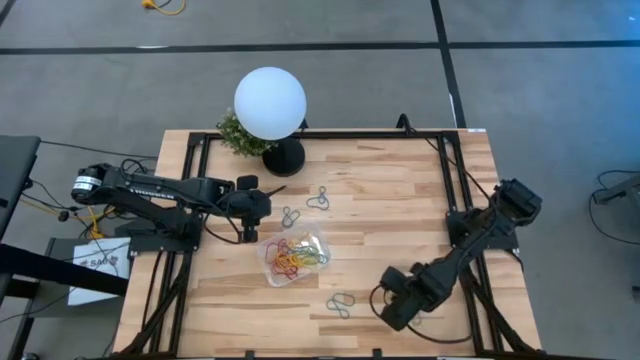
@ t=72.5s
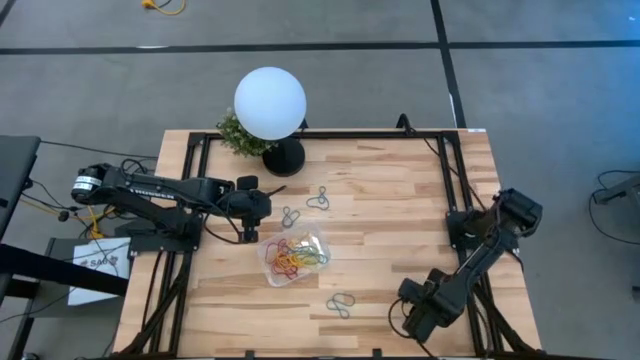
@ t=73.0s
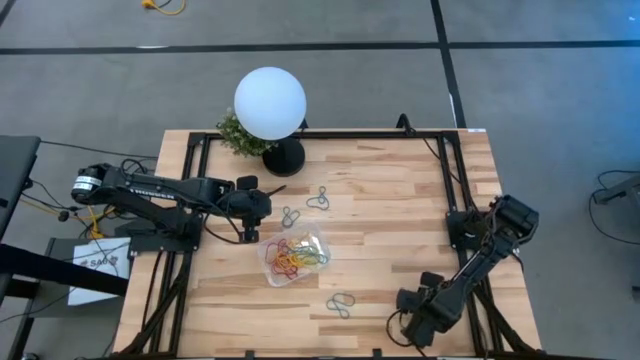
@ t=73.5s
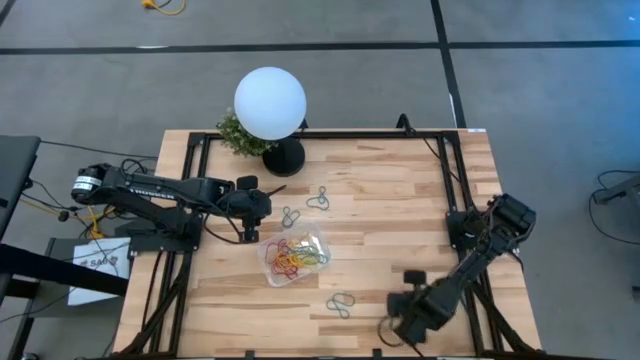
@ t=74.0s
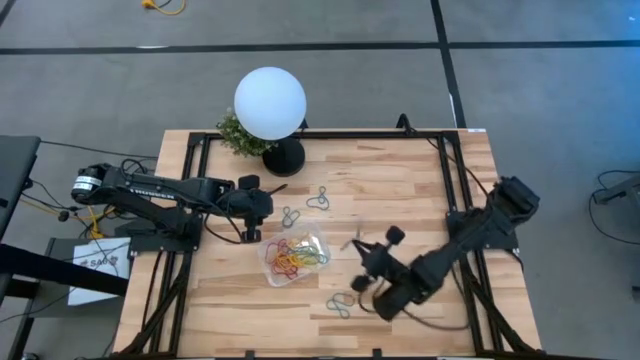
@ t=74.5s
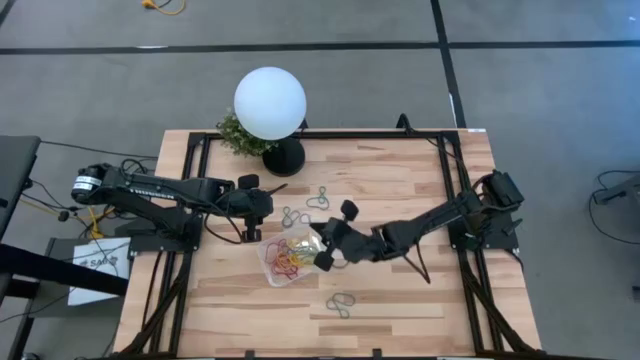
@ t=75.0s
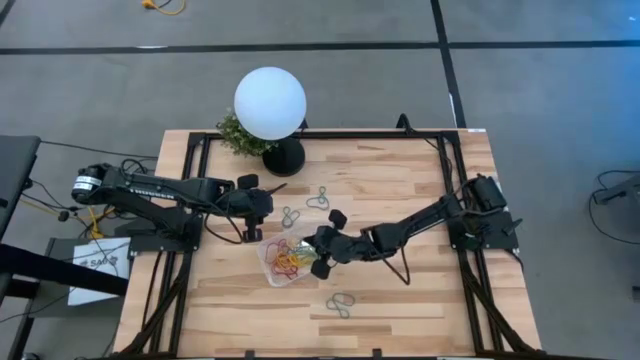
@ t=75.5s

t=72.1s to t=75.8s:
Task: Pick and place items into bin
Put the blue rubber band into the transparent bin

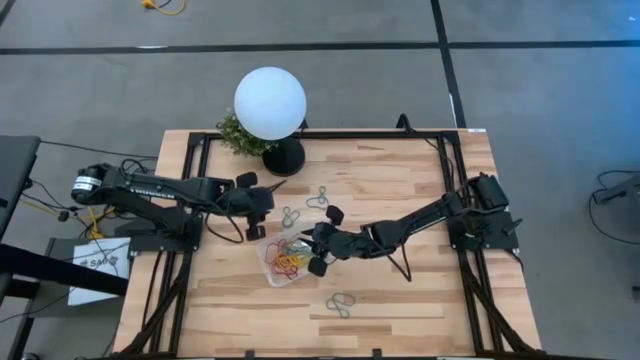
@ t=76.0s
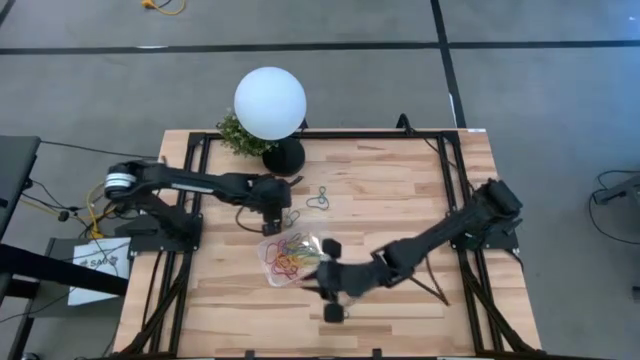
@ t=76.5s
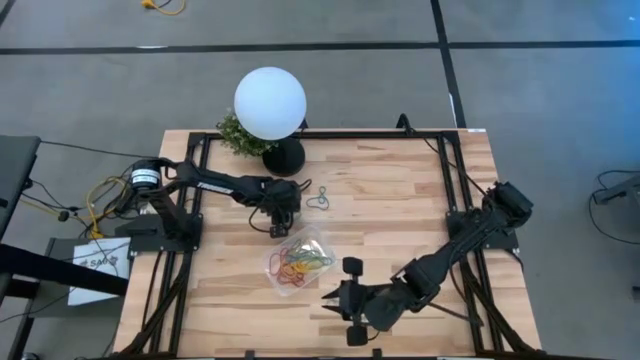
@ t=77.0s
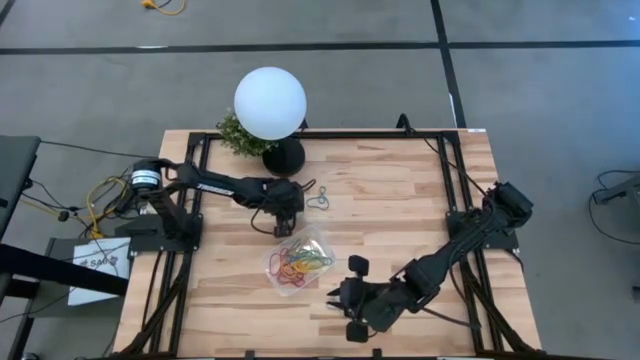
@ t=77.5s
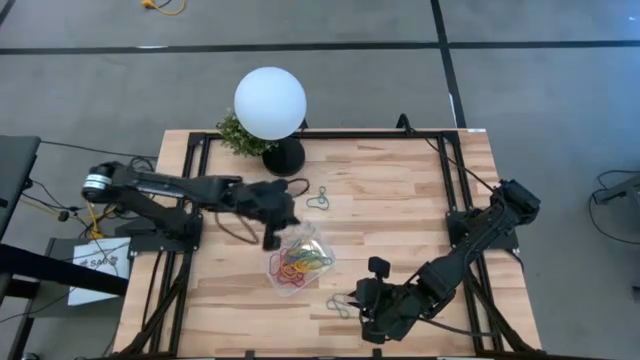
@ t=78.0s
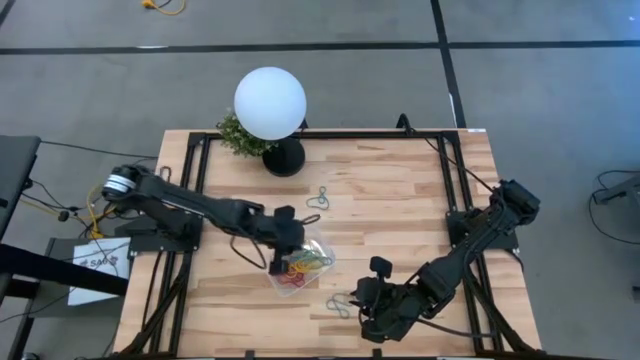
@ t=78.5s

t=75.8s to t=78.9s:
Put the blue rubber band into the transparent bin

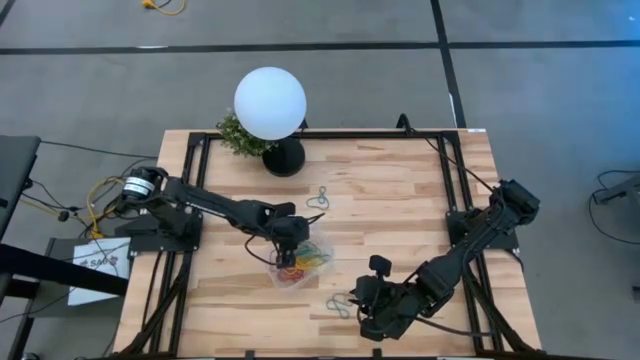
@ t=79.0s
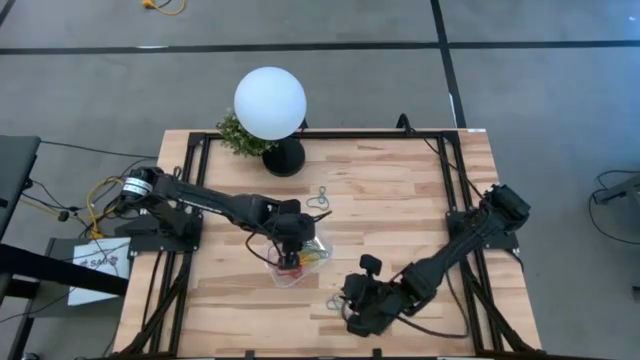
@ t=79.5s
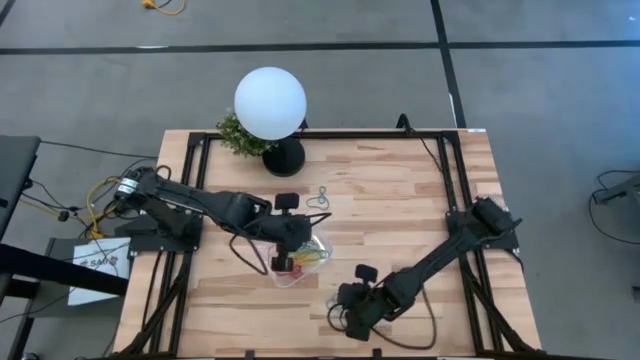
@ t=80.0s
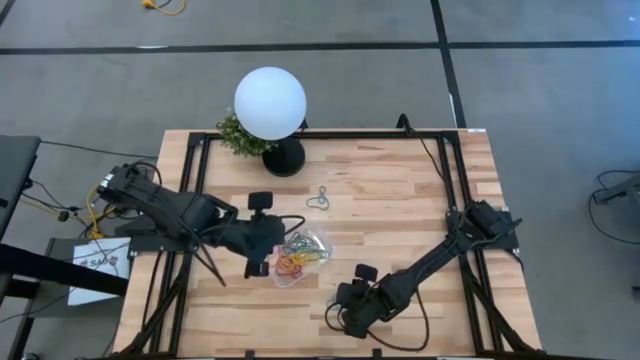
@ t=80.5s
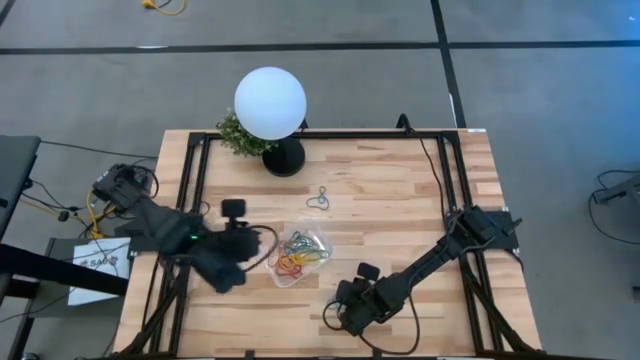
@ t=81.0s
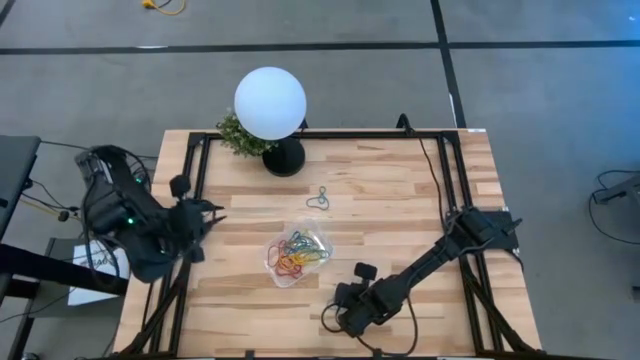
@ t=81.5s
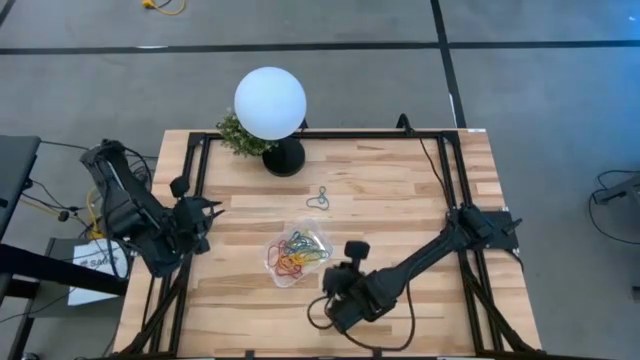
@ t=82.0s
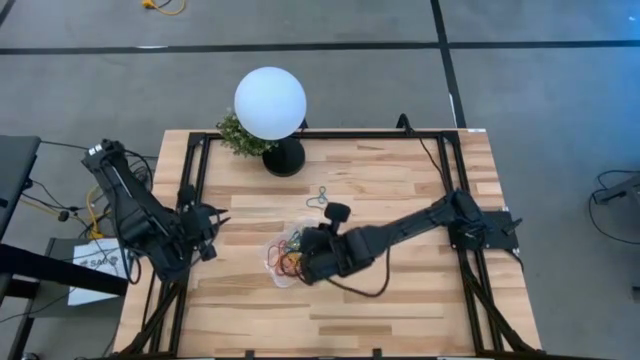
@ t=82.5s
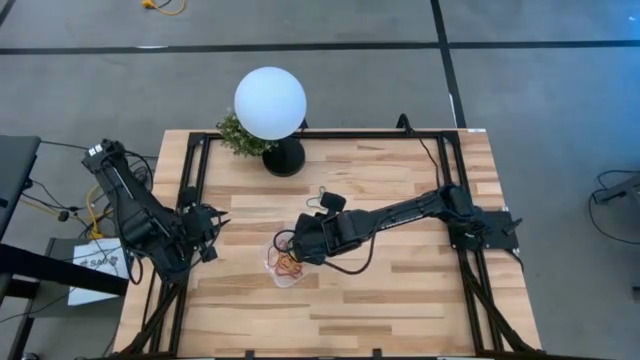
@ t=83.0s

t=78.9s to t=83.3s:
Put the blue rubber band into the transparent bin

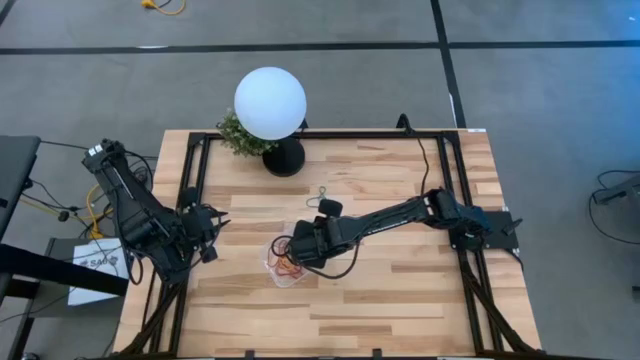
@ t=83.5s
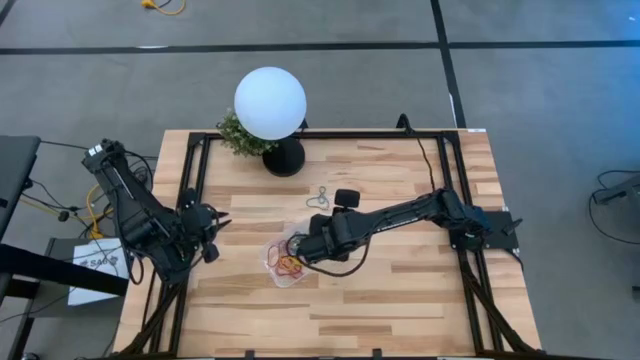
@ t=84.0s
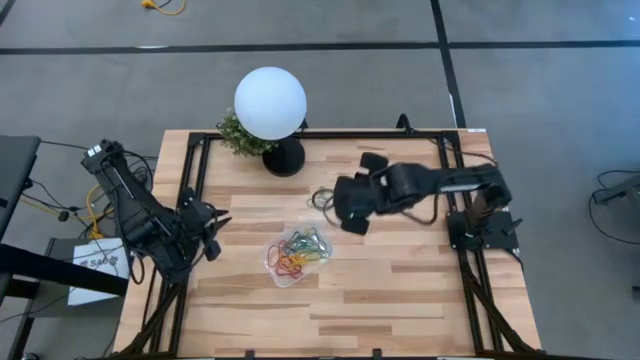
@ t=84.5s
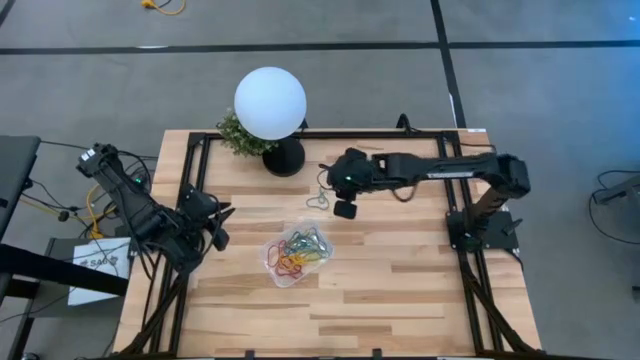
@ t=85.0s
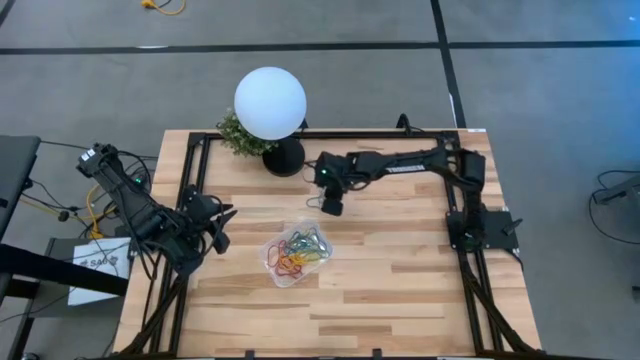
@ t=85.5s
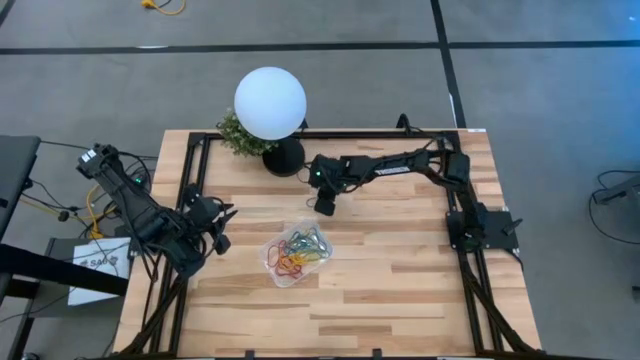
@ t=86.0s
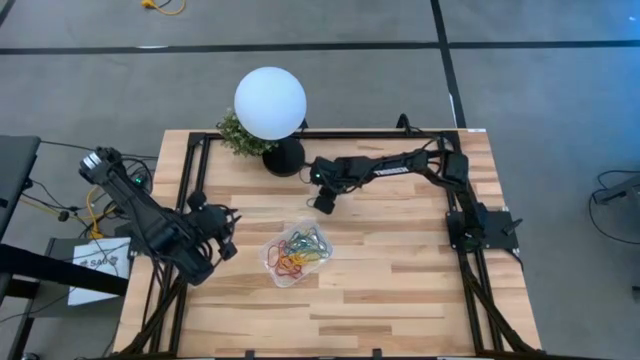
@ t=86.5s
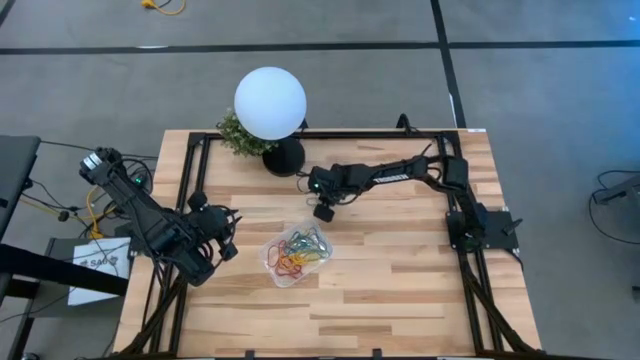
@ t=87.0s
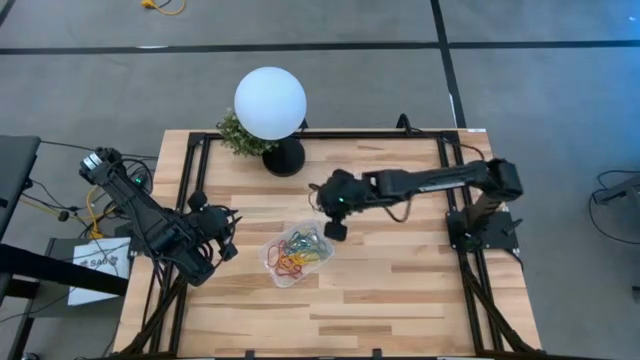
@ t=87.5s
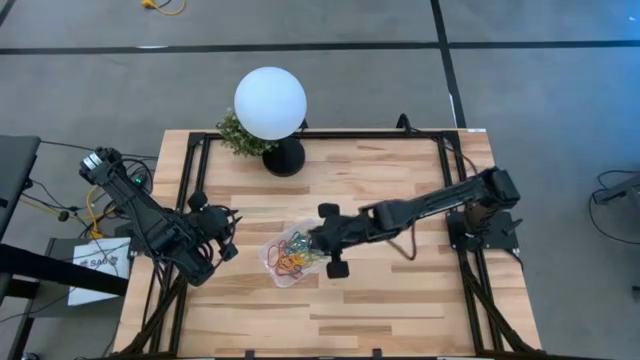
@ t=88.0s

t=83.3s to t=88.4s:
Put the blue rubber band into the transparent bin

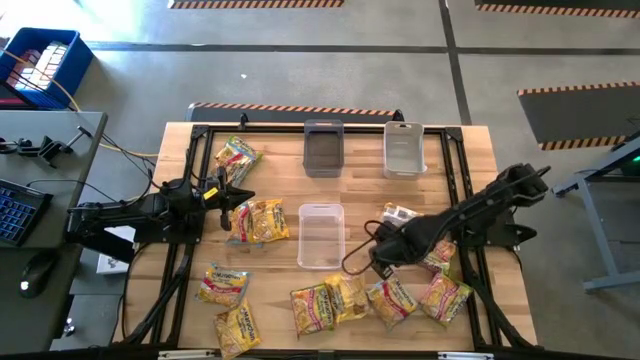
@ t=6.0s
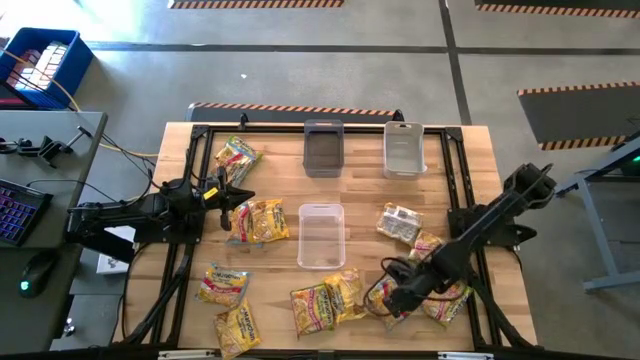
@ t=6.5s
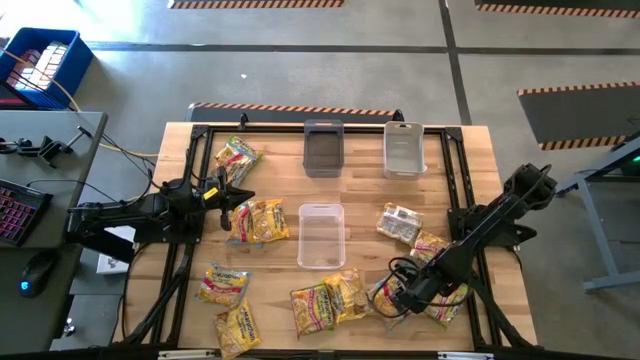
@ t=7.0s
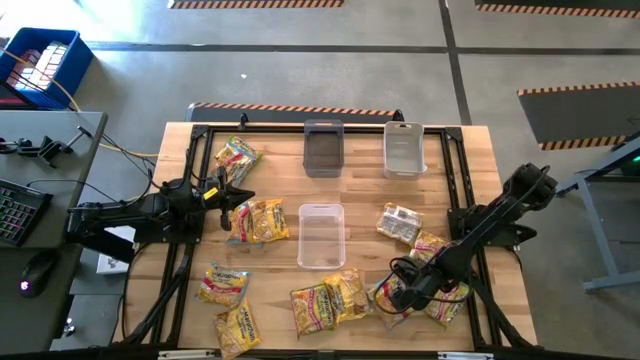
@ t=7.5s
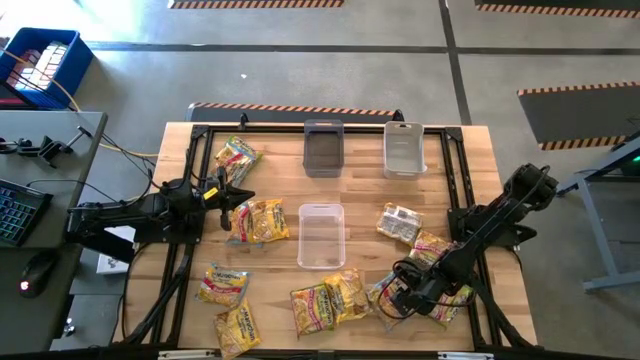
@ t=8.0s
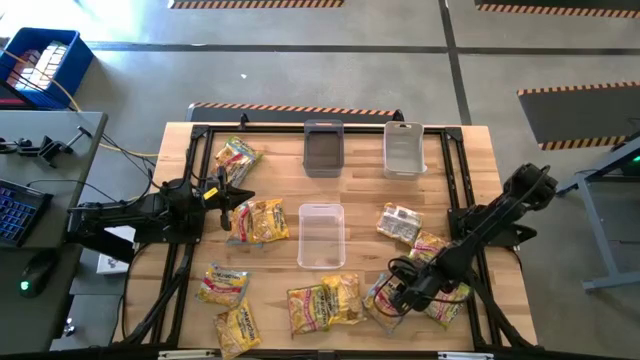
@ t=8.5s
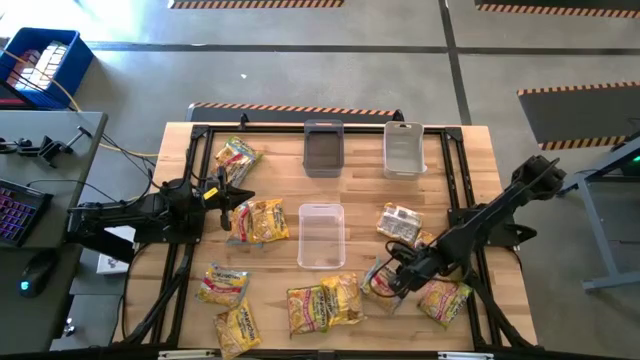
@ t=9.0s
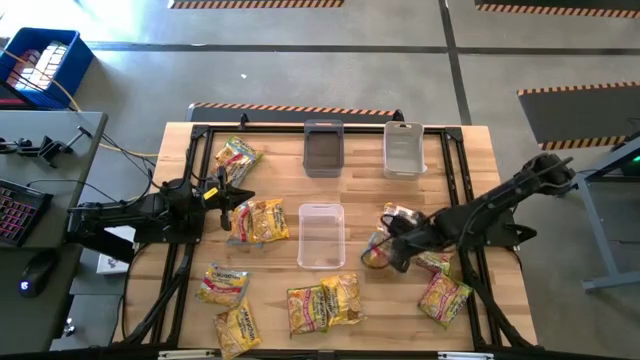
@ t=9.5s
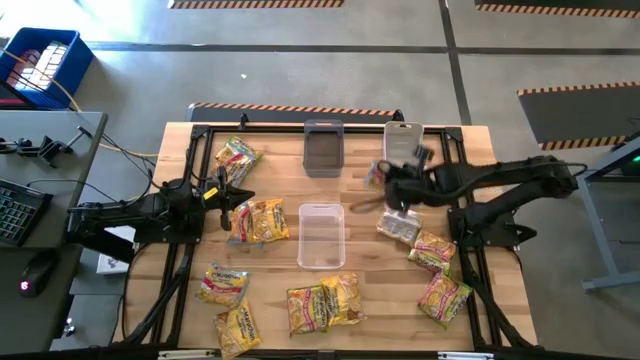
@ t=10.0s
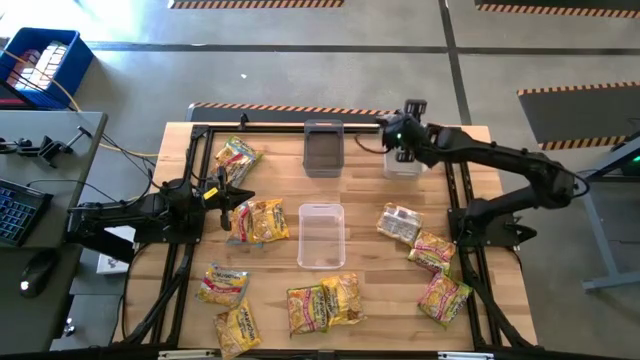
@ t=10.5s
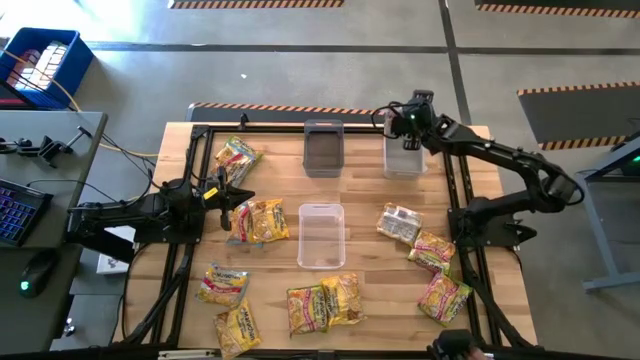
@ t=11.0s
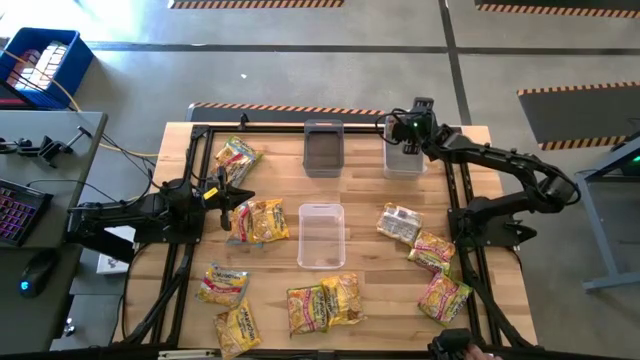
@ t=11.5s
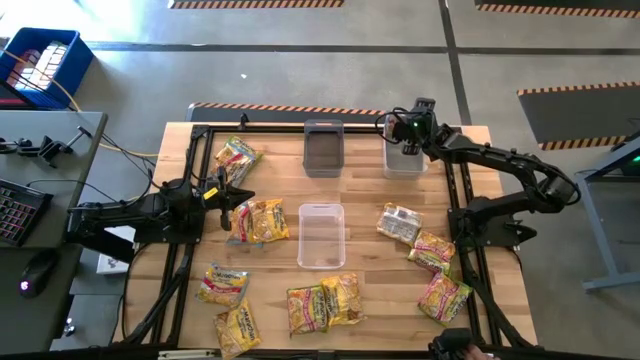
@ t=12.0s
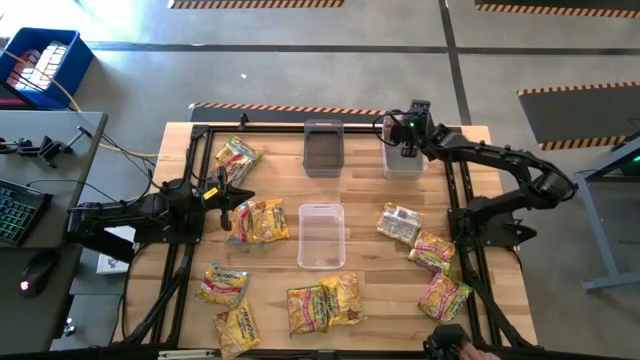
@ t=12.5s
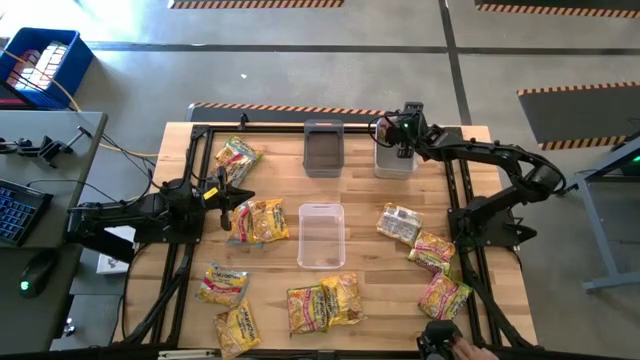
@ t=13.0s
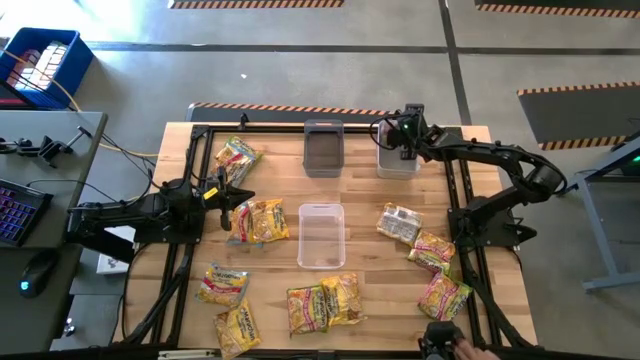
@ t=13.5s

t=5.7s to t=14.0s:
Task: Sort Maruchan noodles
Put the blue noodle pack into the white bin
